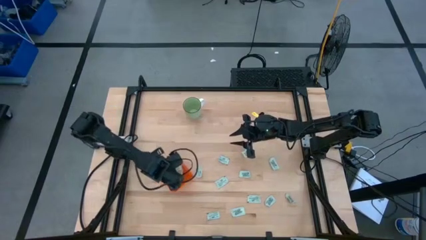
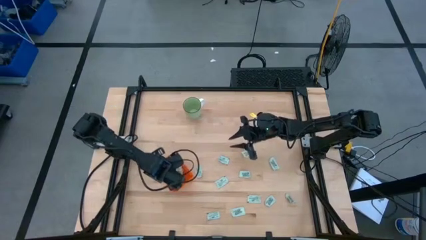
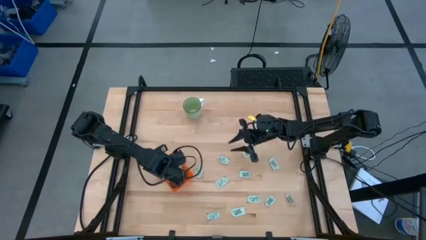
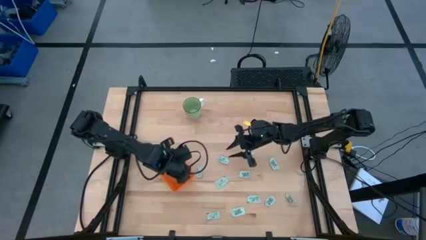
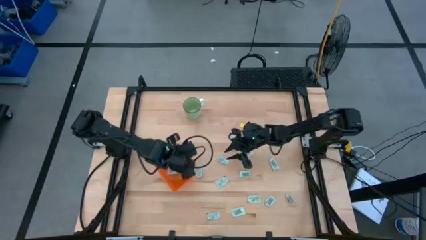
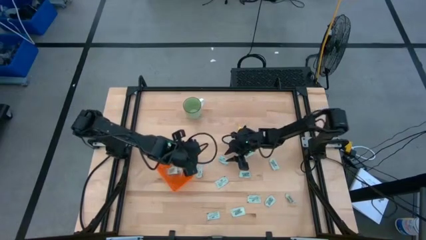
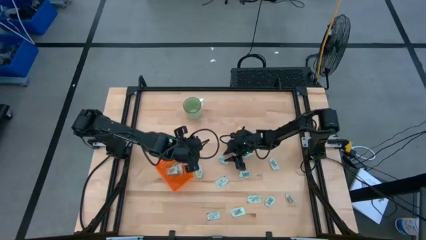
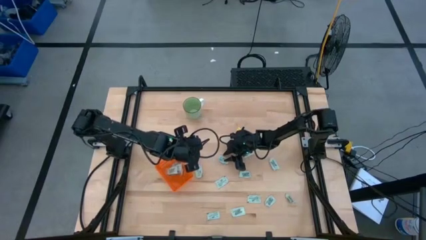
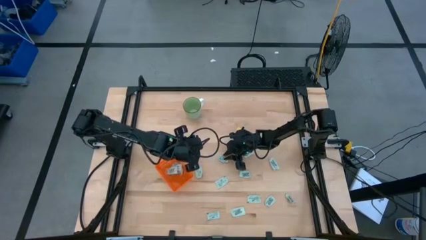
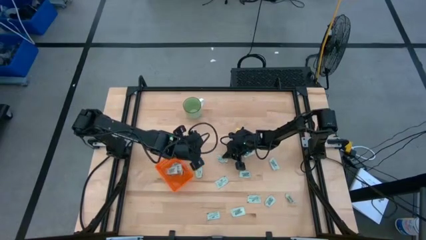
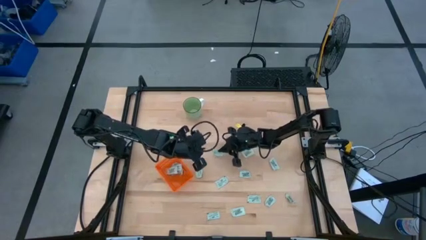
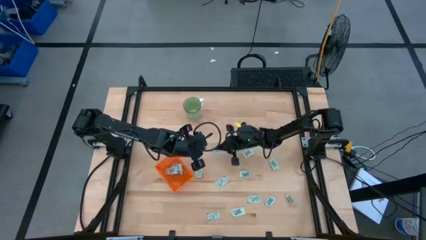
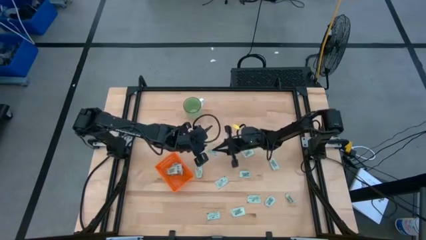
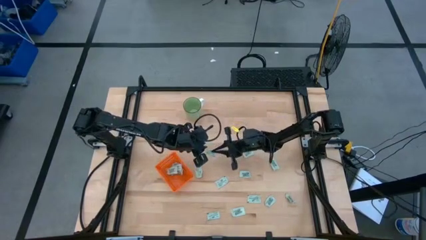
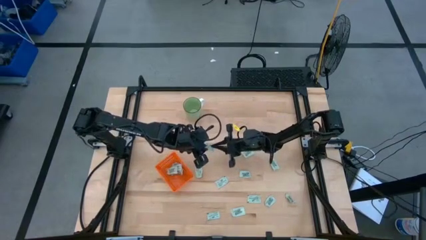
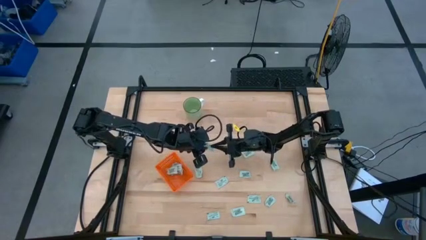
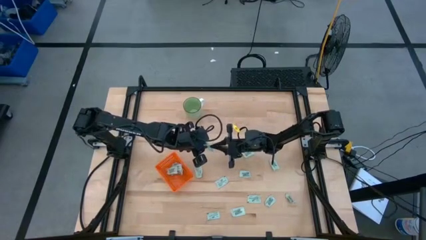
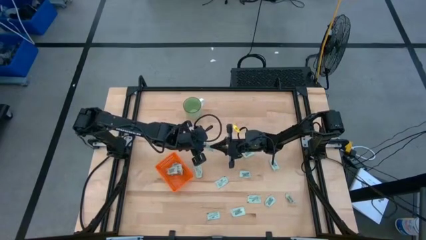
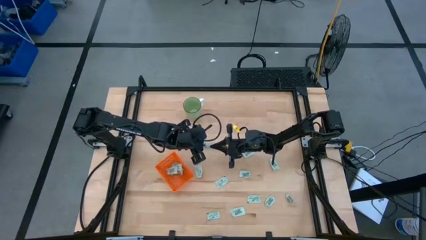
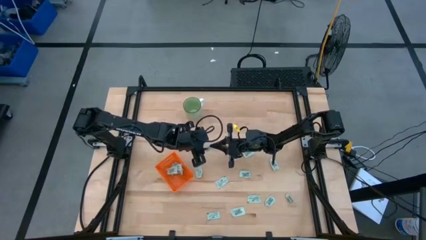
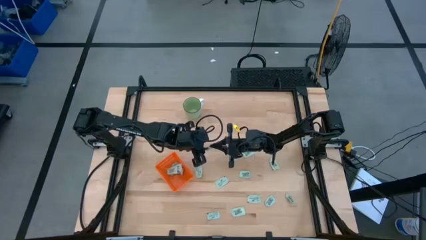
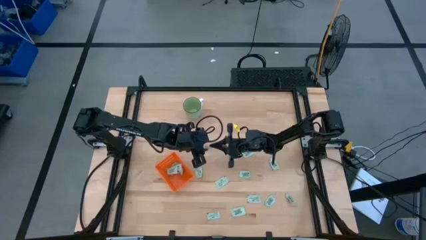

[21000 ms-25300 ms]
Task: Pick and place Stevia / Truvia into bins
Put the stevia packet into the orange basket

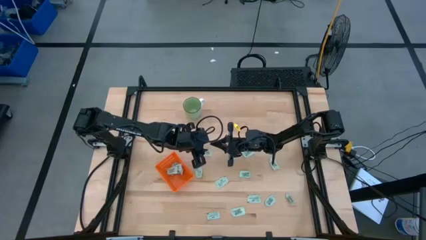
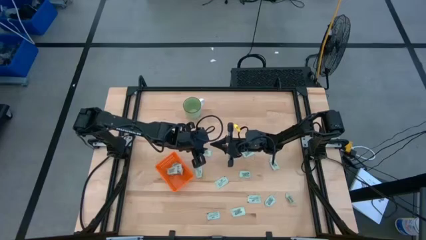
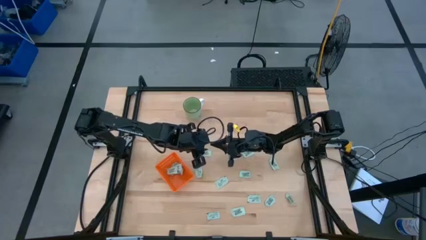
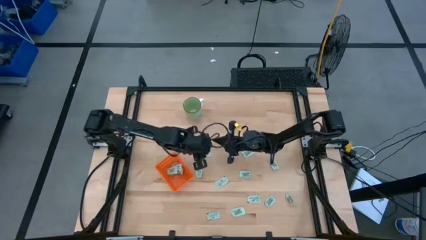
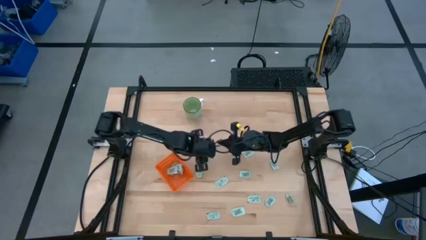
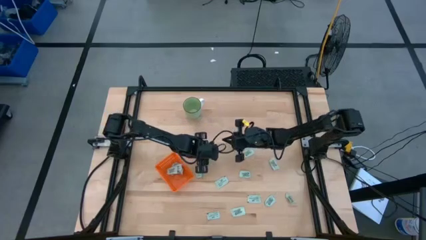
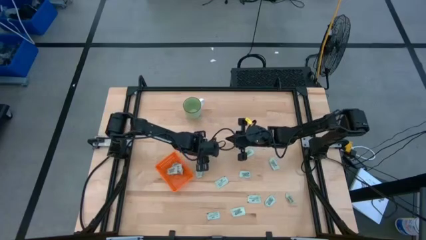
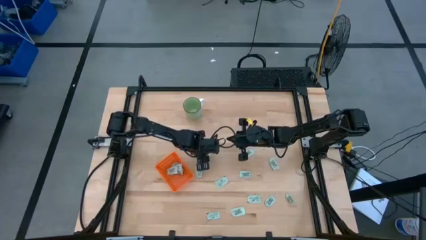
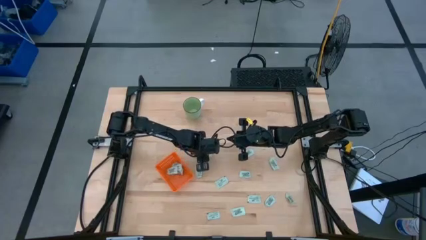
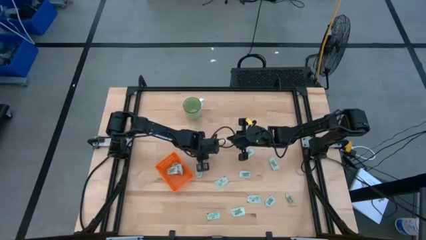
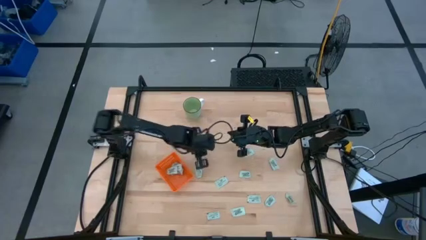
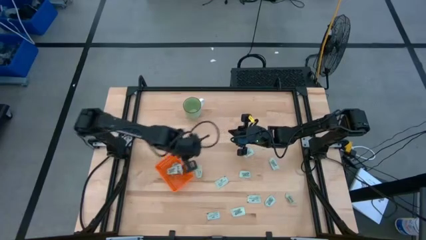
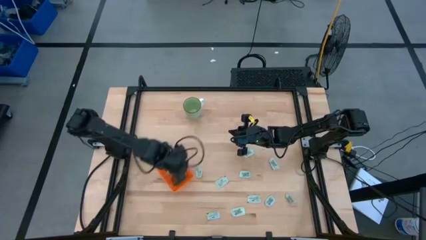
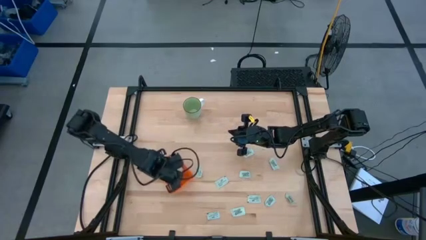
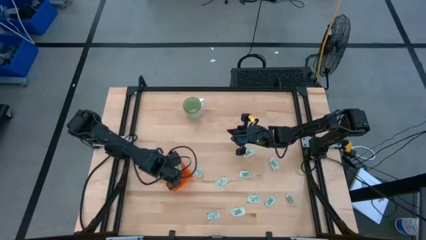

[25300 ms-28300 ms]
Put the stevia packet into the orange basket

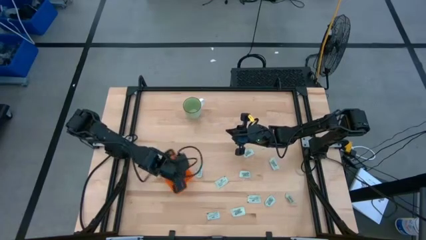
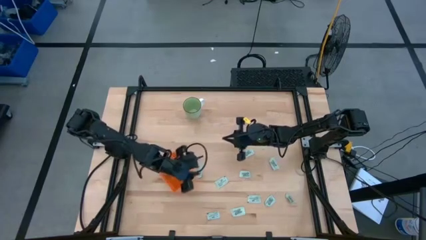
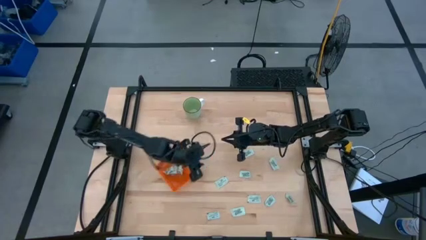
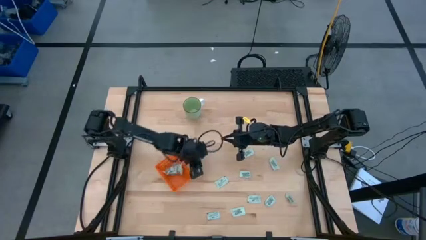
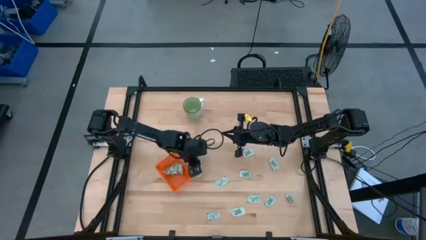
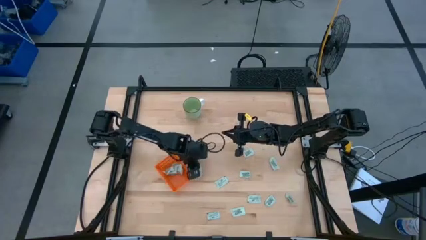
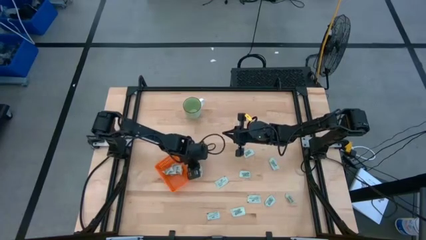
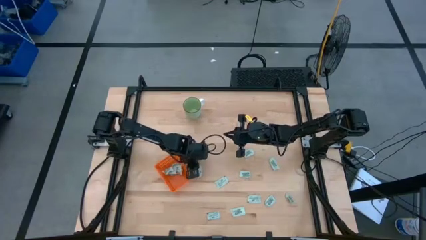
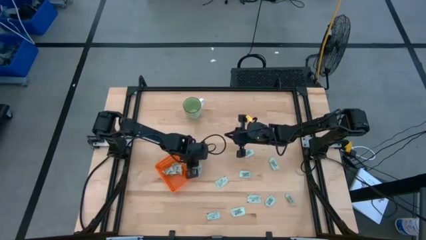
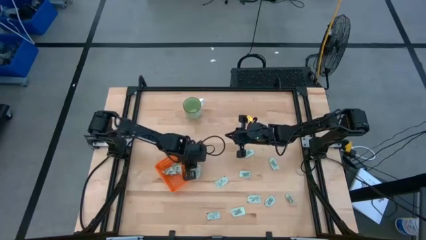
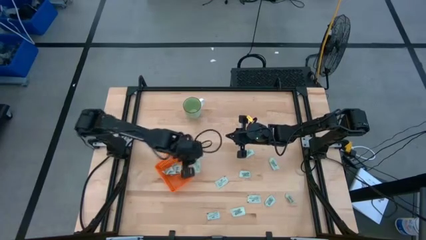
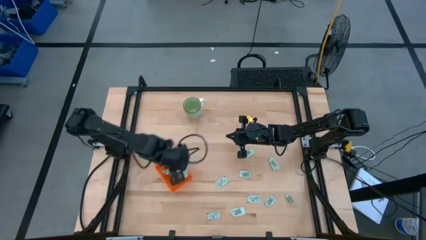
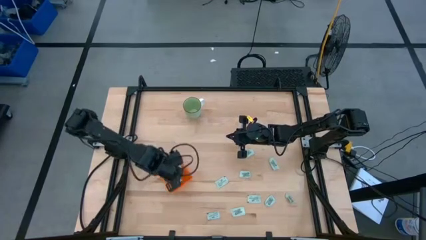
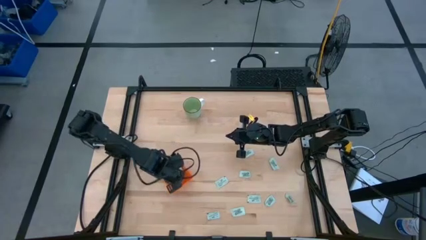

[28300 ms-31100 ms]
Put the stevia packet into the orange basket

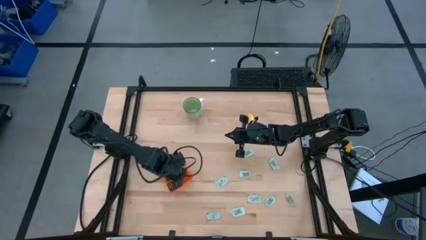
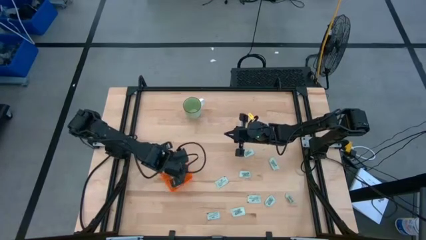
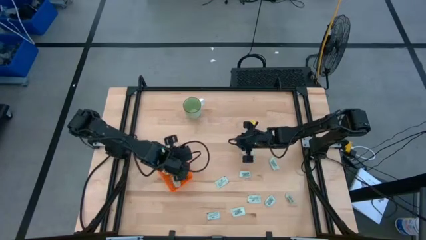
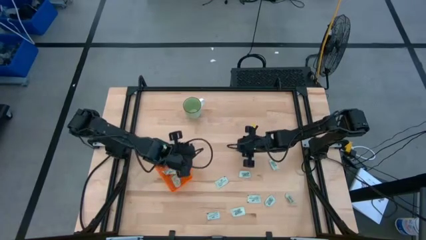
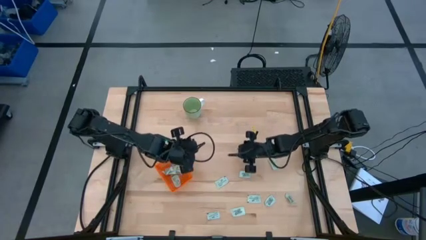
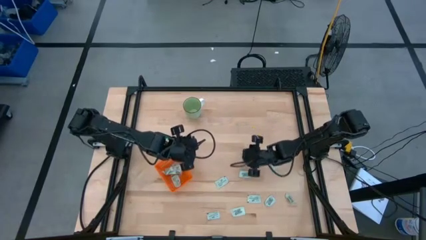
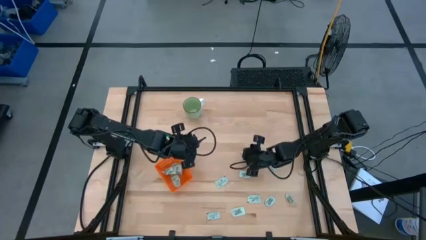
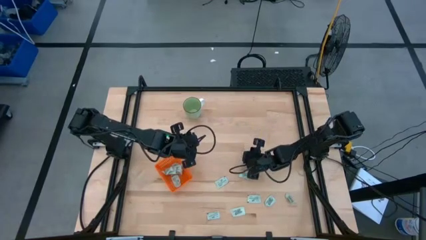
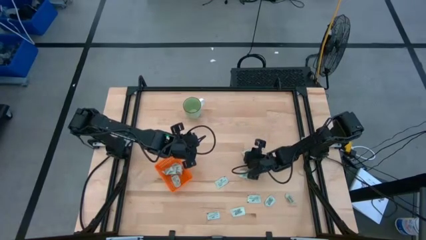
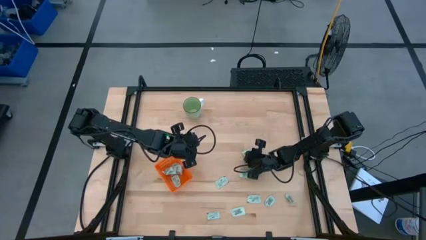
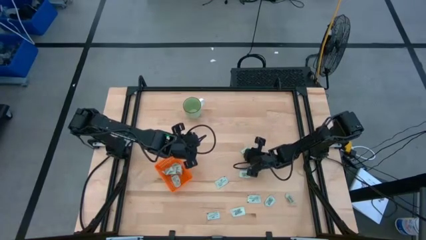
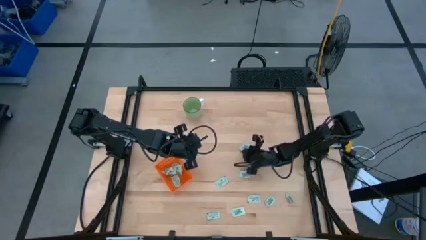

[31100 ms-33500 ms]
Put the stevia packet into the orange basket

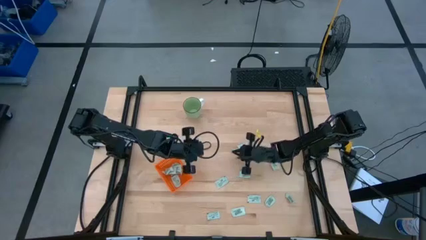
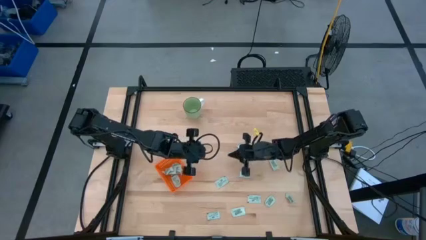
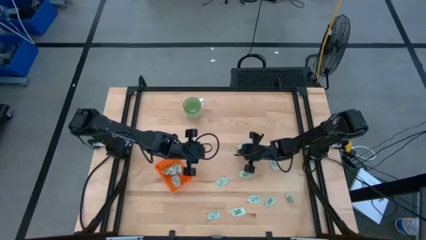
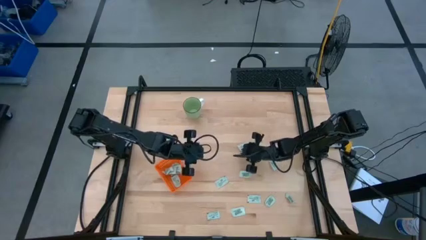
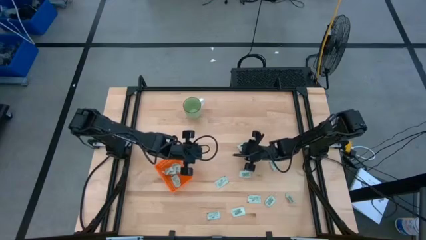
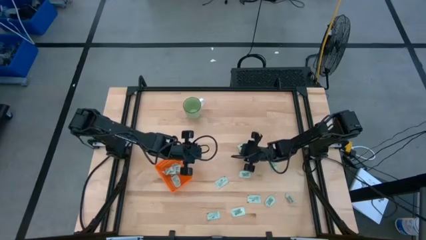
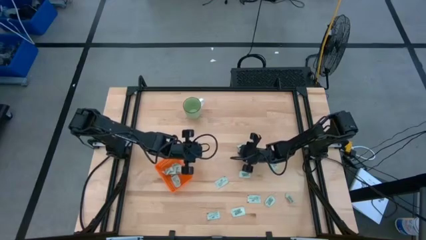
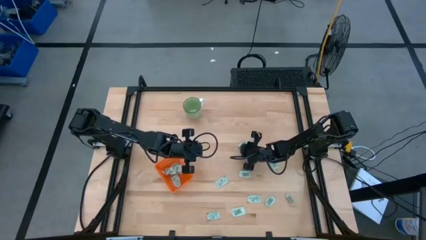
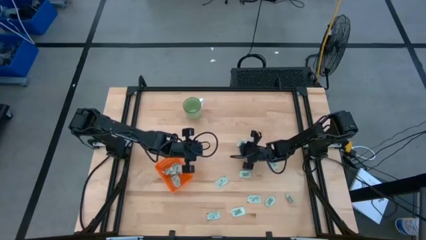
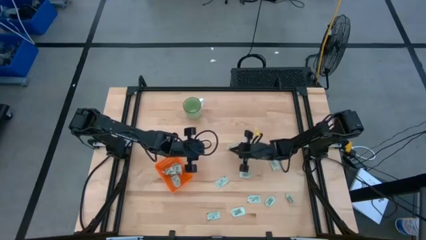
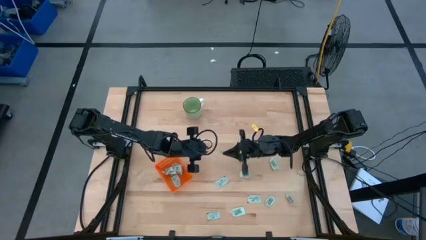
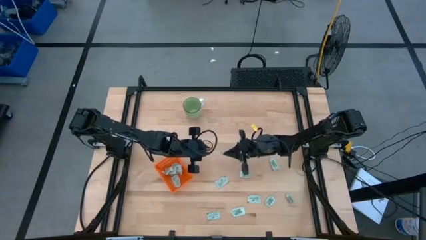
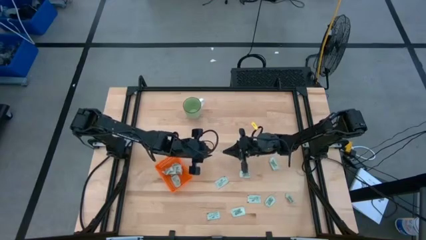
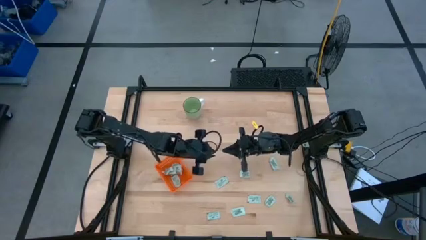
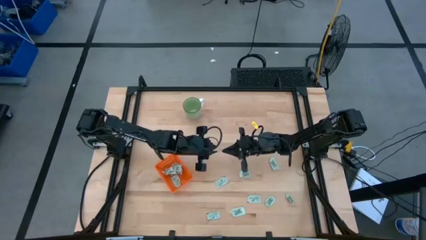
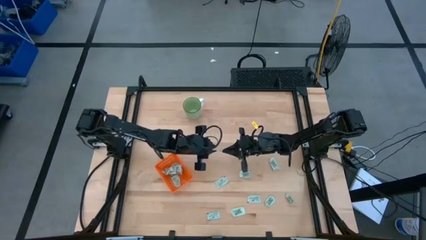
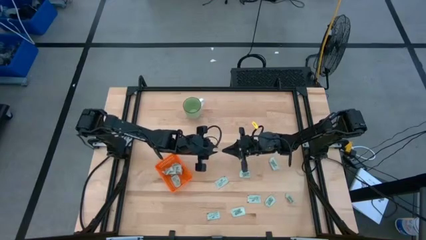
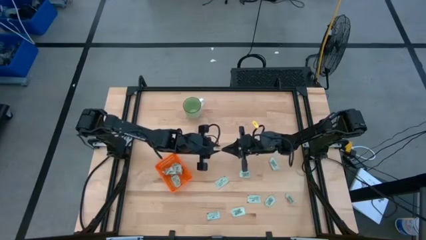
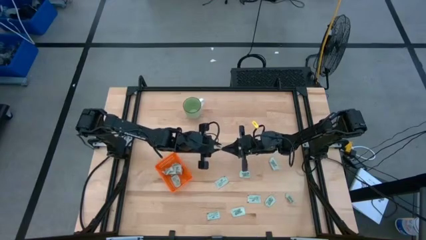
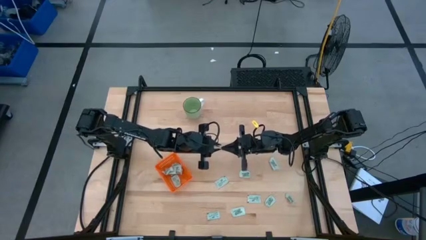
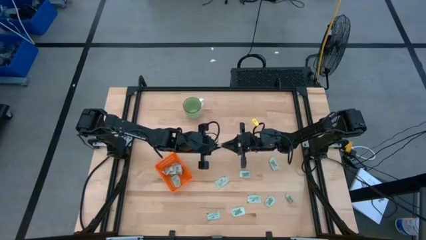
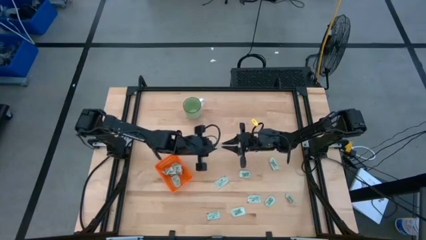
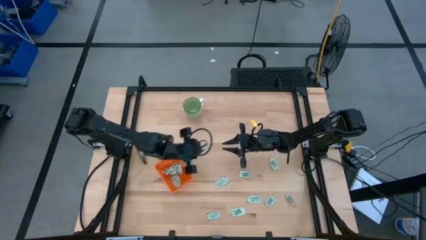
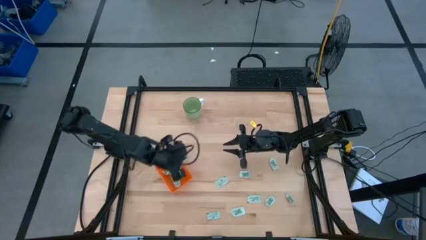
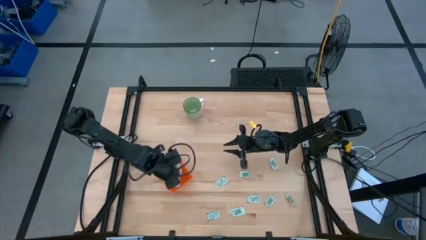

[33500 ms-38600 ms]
Put the stevia packet into the orange basket
